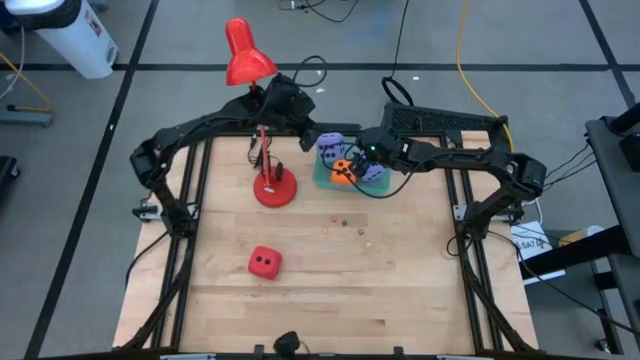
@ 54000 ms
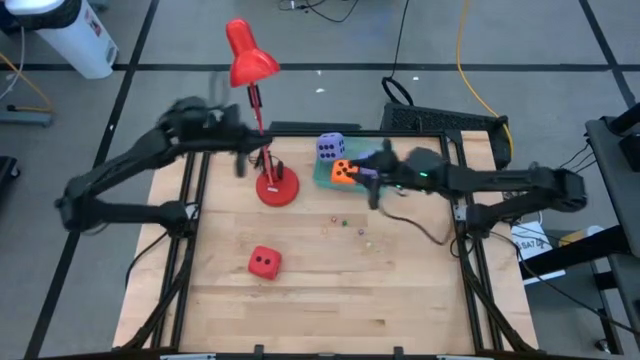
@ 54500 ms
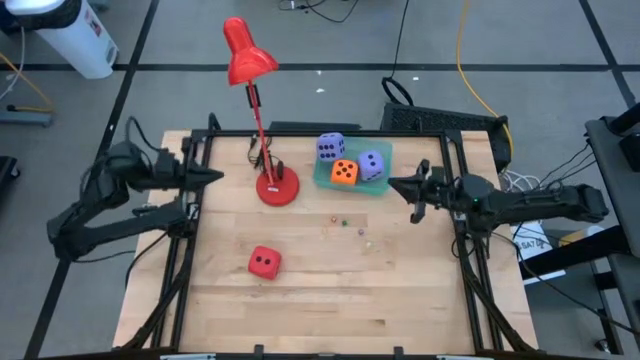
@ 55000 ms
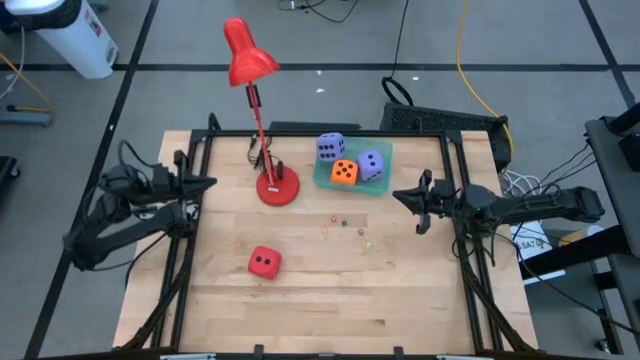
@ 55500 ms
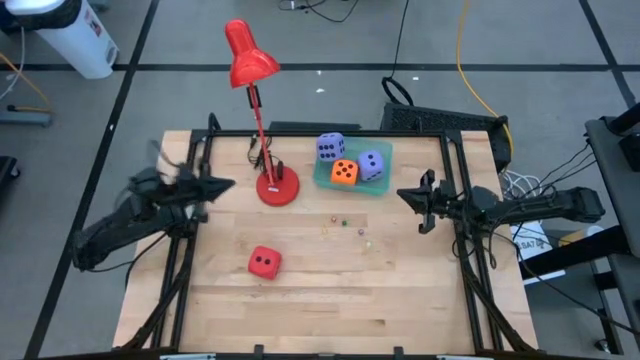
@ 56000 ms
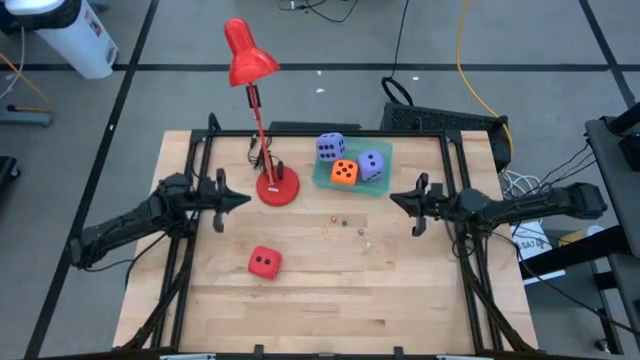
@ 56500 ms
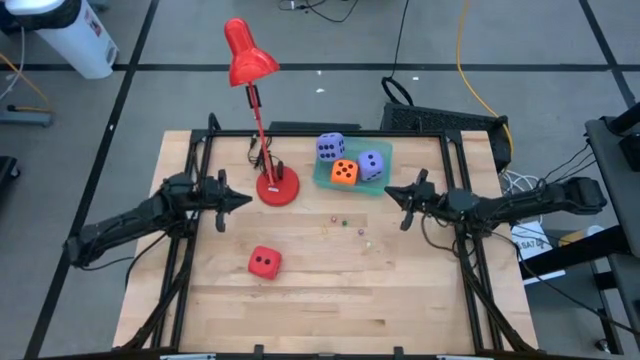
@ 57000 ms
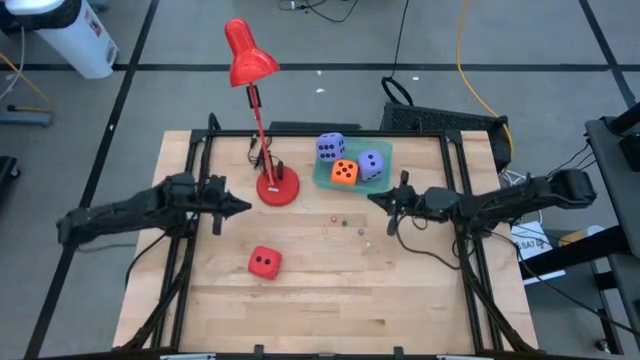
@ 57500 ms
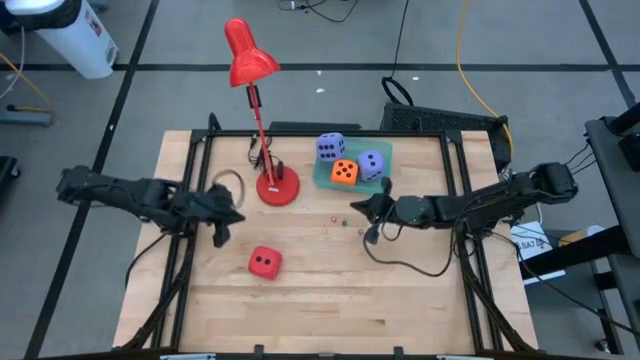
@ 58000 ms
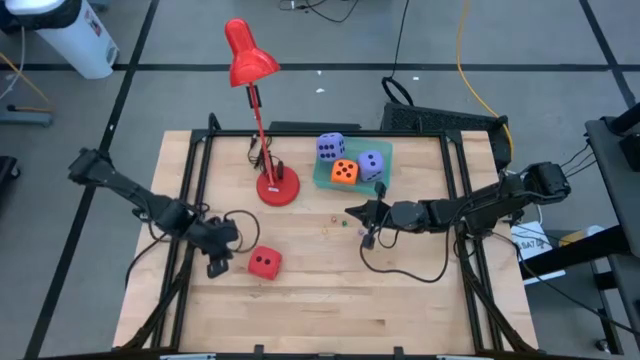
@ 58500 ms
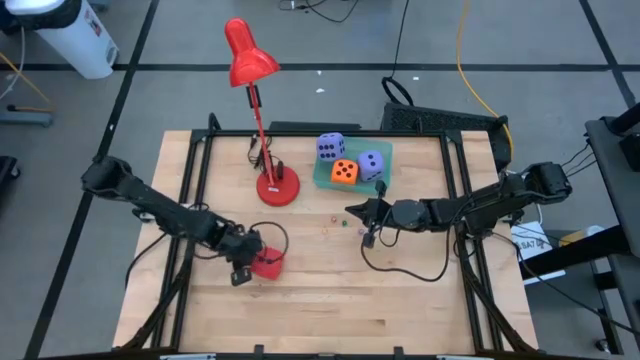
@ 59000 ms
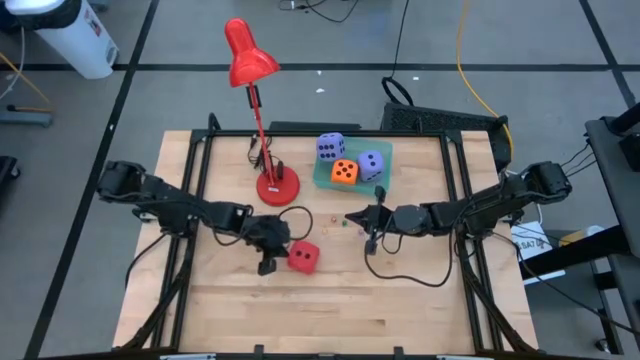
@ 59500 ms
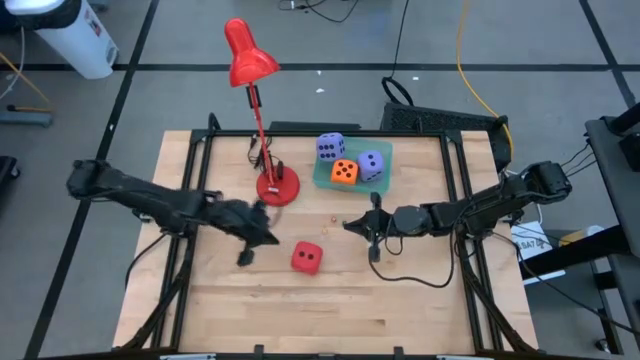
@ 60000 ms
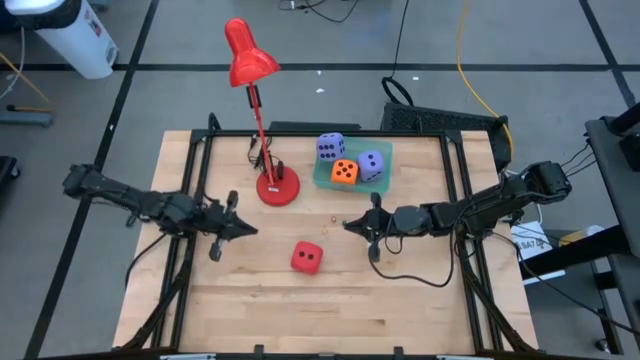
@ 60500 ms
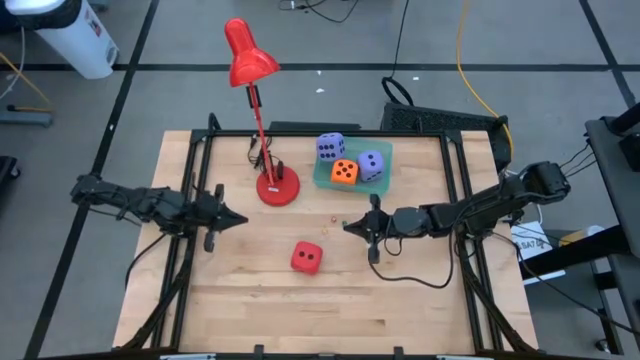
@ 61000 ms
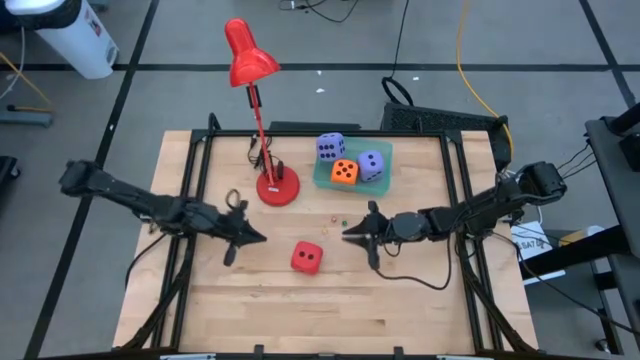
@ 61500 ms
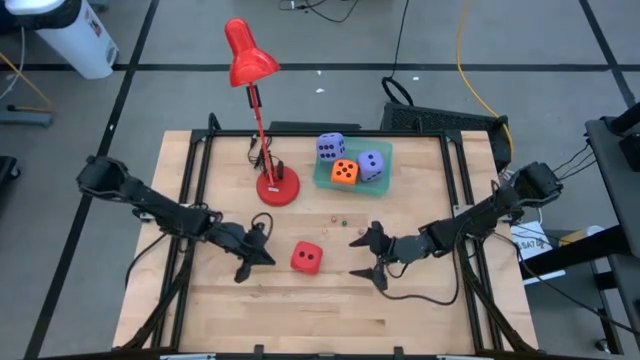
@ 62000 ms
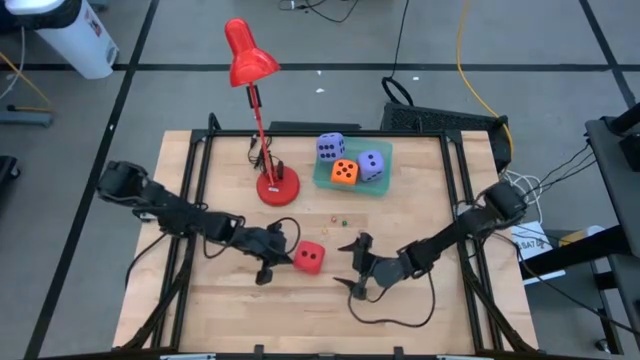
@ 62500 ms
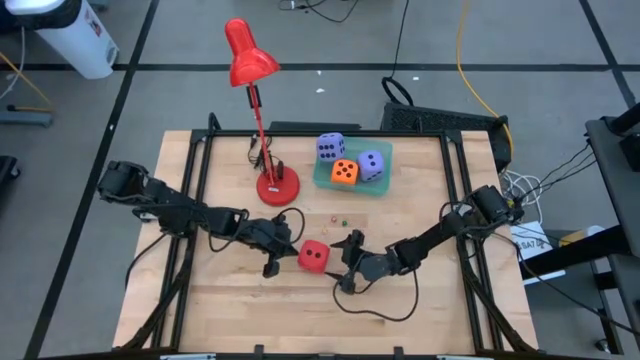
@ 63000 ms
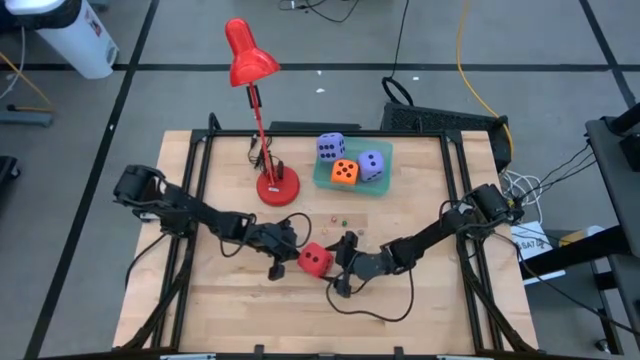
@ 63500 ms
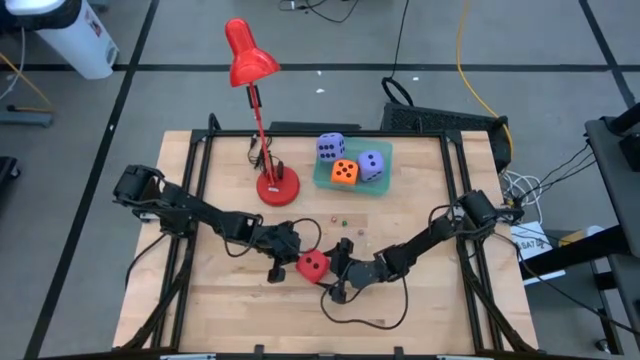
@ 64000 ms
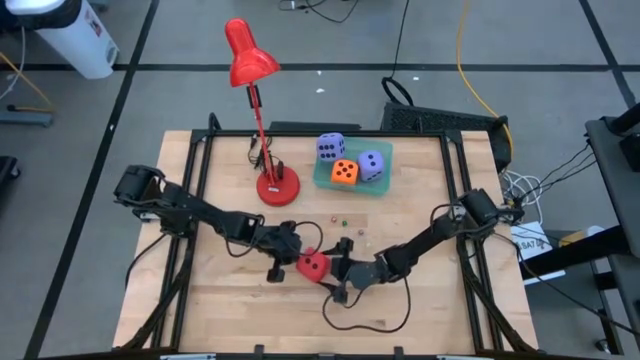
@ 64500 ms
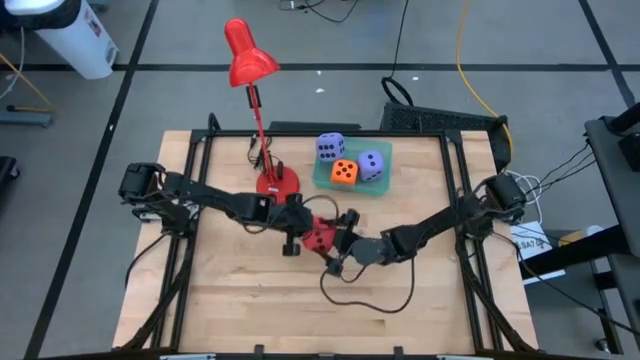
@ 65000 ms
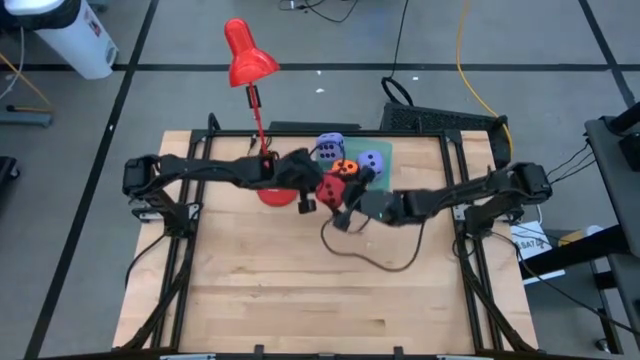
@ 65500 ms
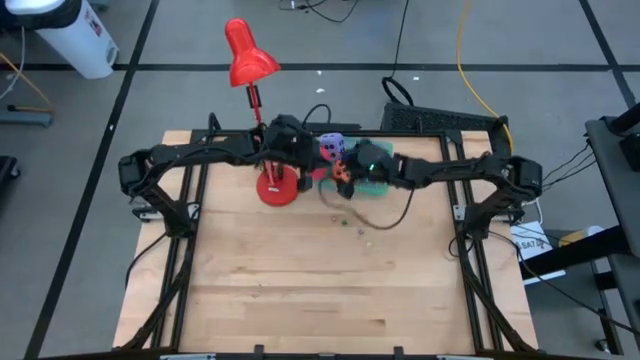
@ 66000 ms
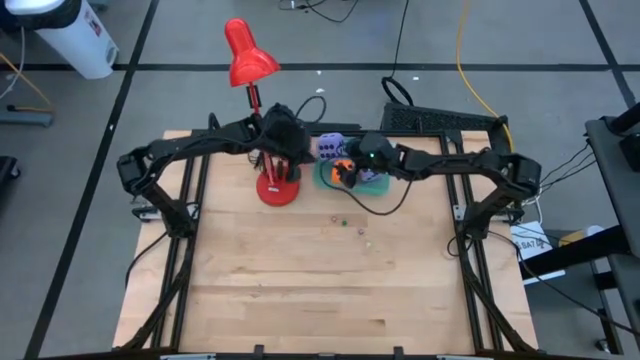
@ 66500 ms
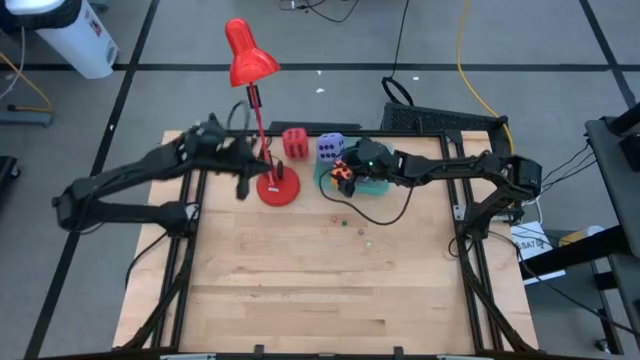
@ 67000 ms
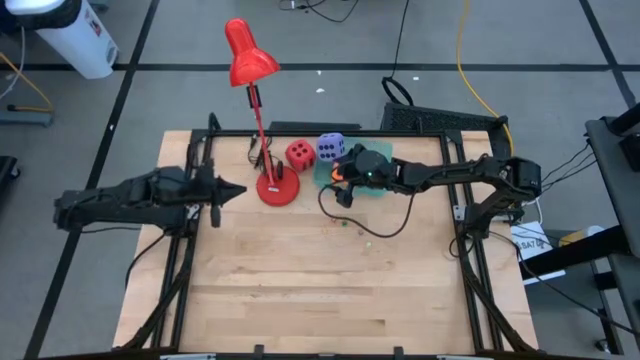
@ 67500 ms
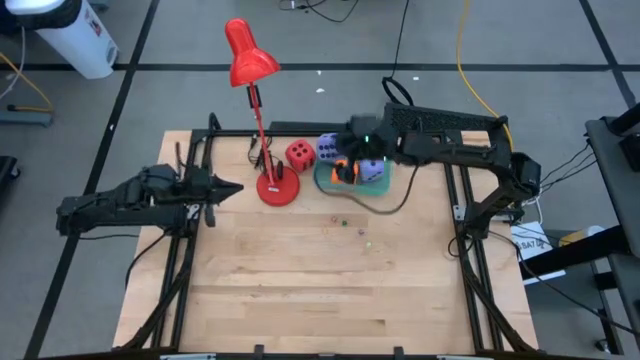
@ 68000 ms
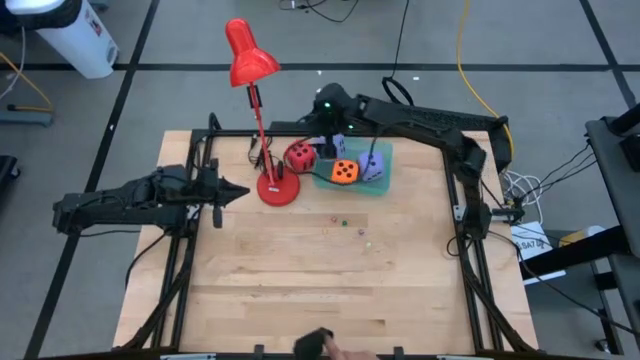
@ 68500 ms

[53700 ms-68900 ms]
Task: Pick & Place Dice
Put the big red dice into the green bin

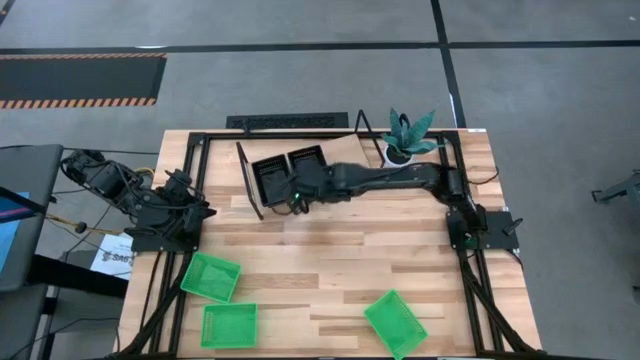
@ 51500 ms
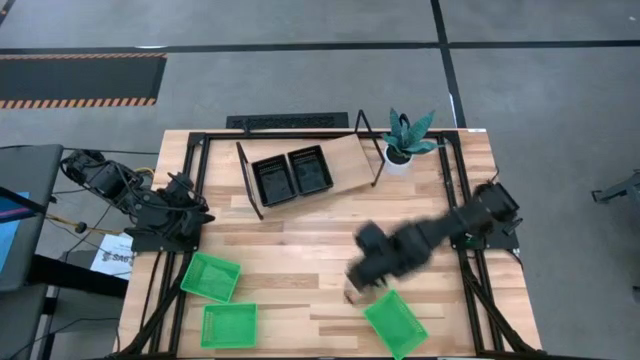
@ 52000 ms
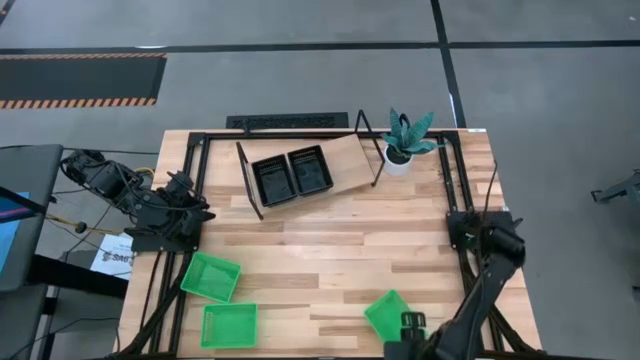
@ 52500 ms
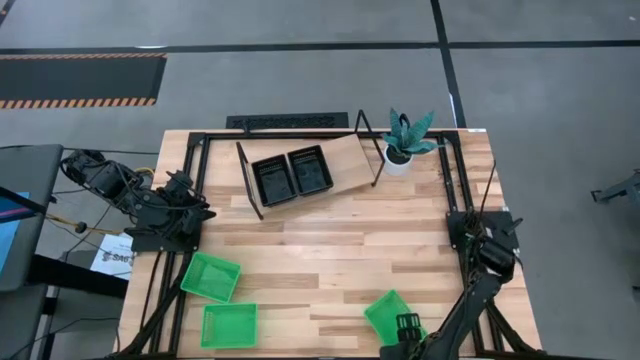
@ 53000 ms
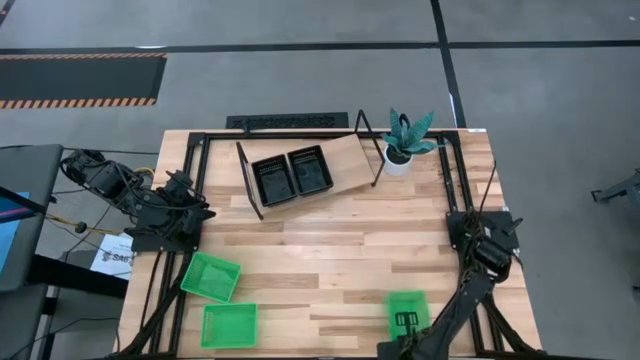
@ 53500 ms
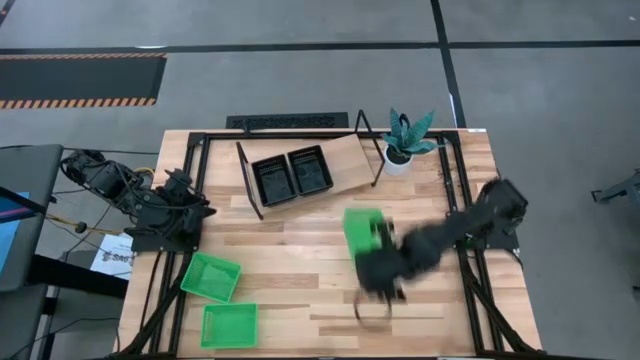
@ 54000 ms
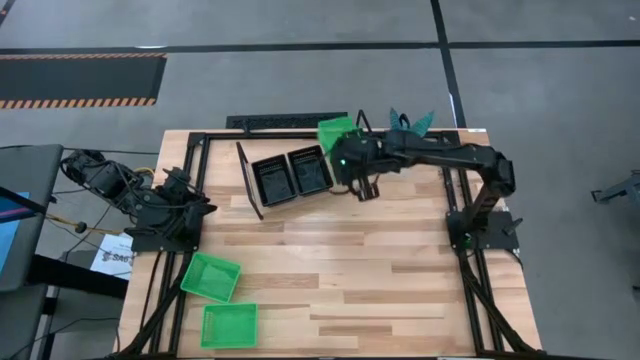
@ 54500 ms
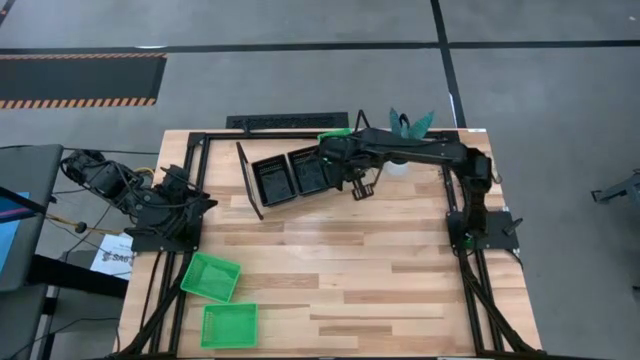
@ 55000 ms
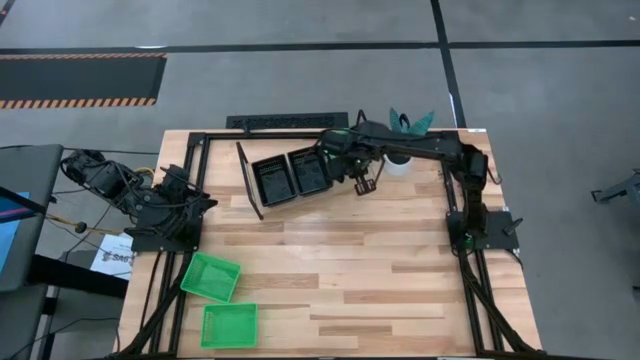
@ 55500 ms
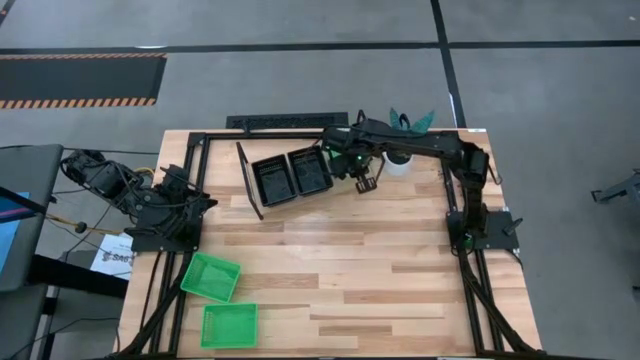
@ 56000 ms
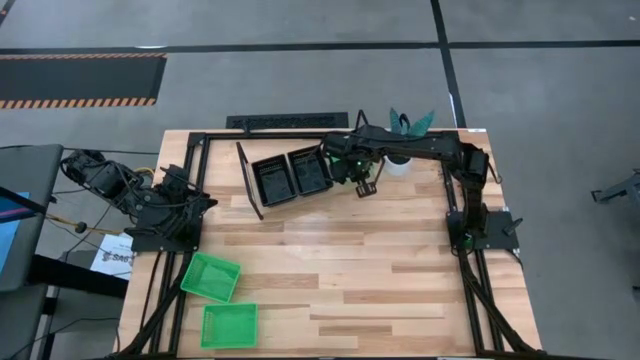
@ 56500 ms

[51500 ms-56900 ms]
Task: Stack baskets on shelf by color
Put the bottom right green bin on the shelf
